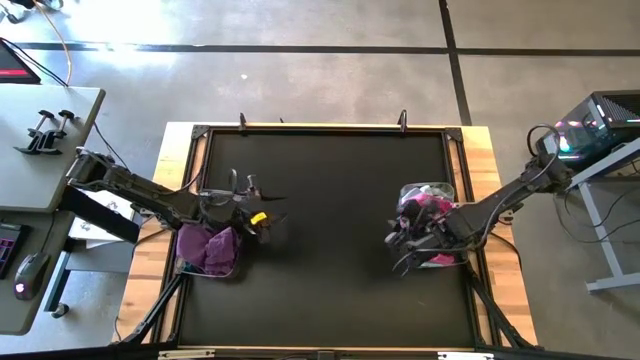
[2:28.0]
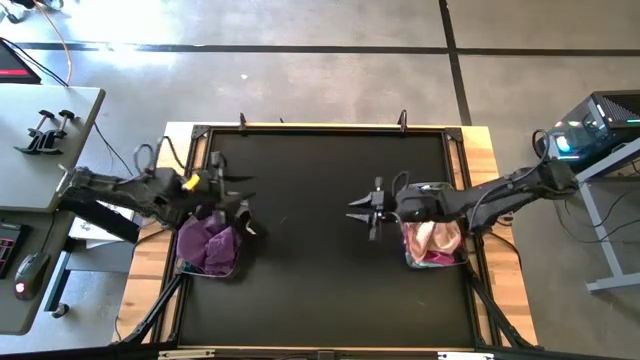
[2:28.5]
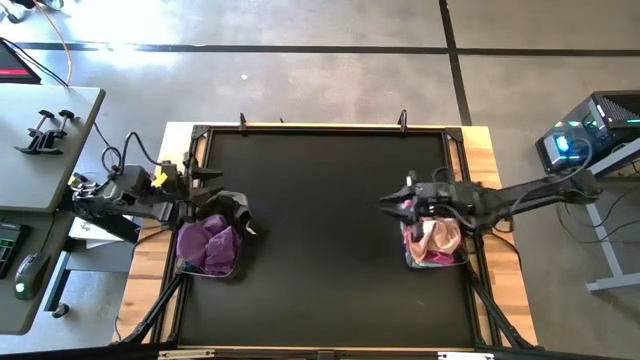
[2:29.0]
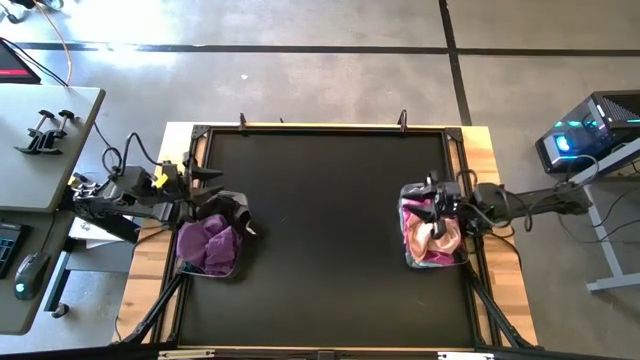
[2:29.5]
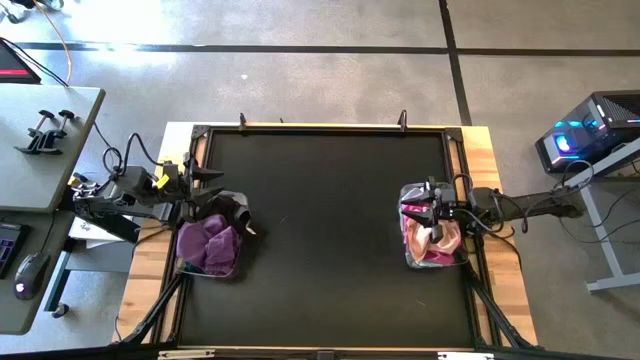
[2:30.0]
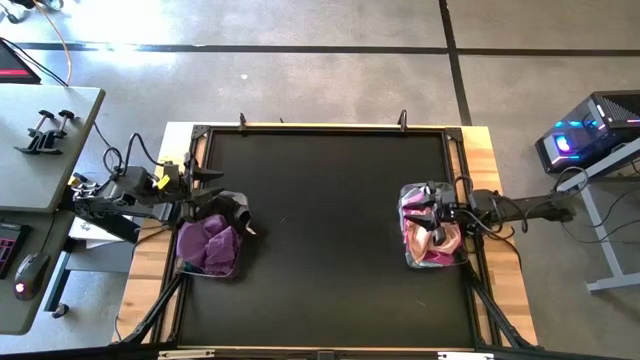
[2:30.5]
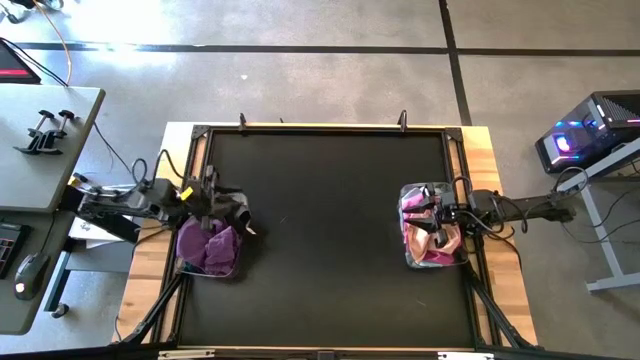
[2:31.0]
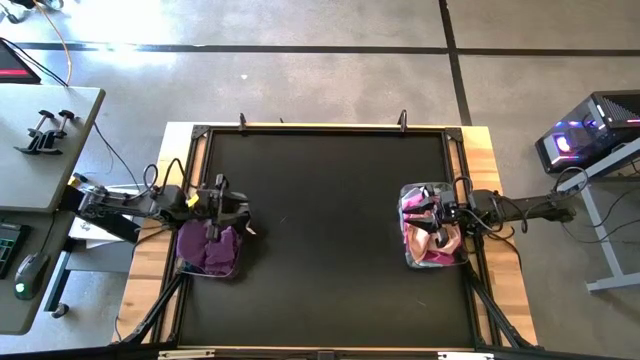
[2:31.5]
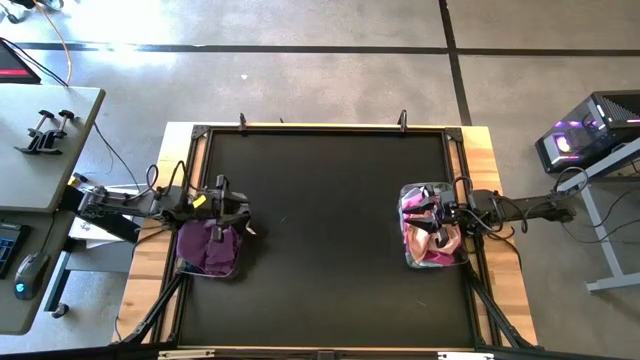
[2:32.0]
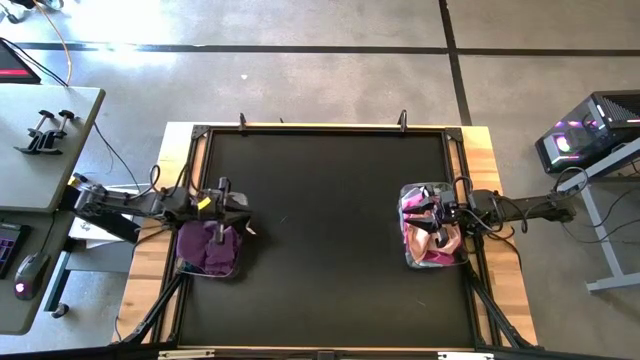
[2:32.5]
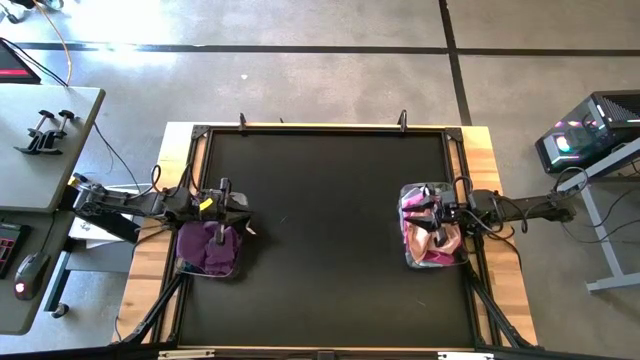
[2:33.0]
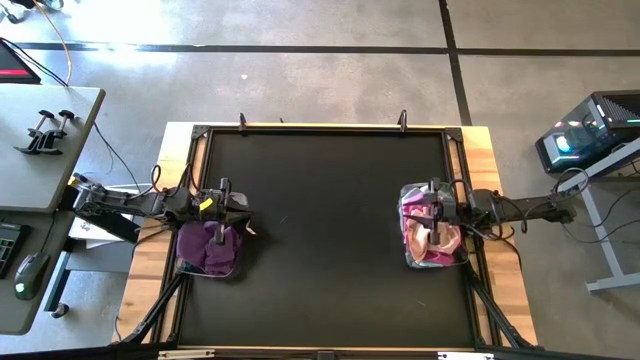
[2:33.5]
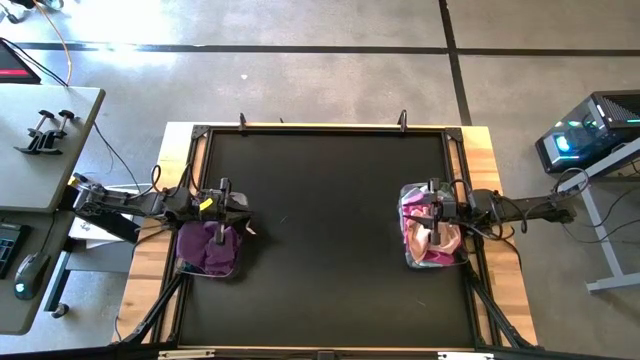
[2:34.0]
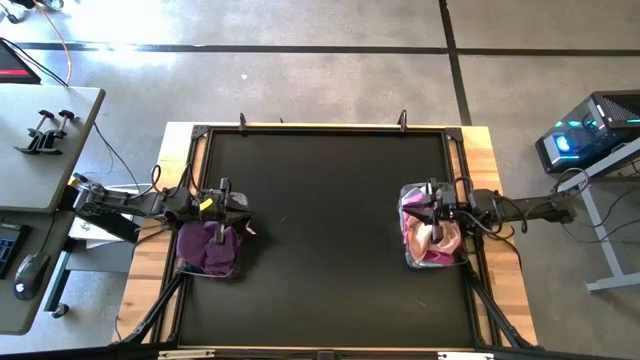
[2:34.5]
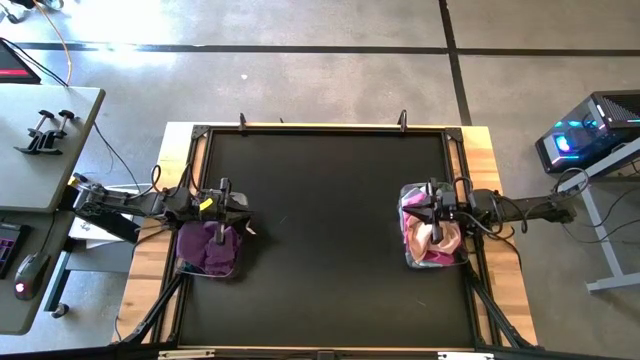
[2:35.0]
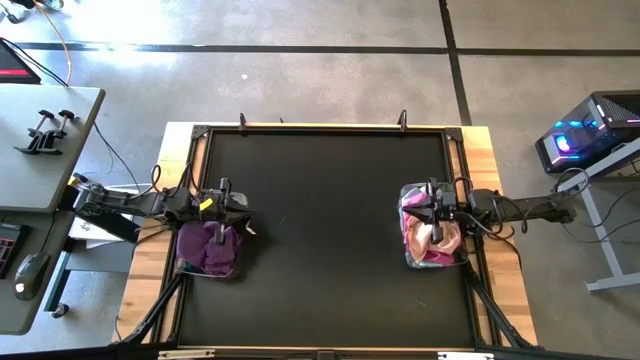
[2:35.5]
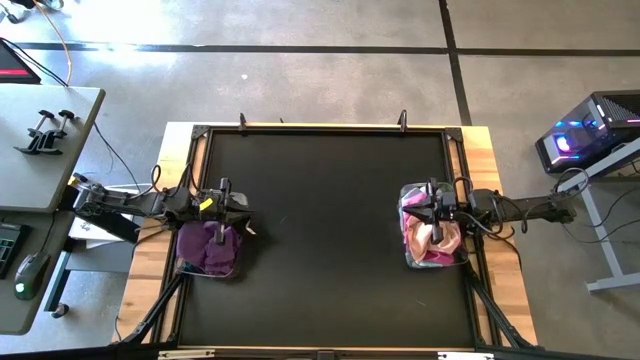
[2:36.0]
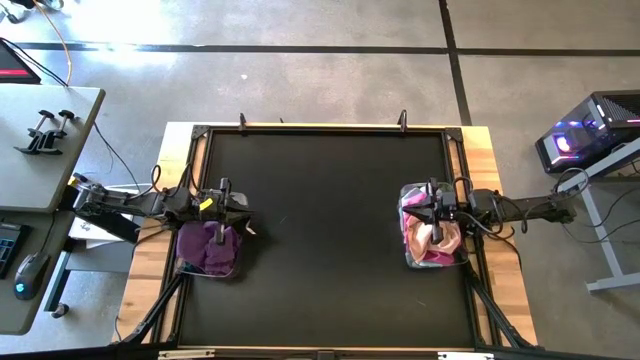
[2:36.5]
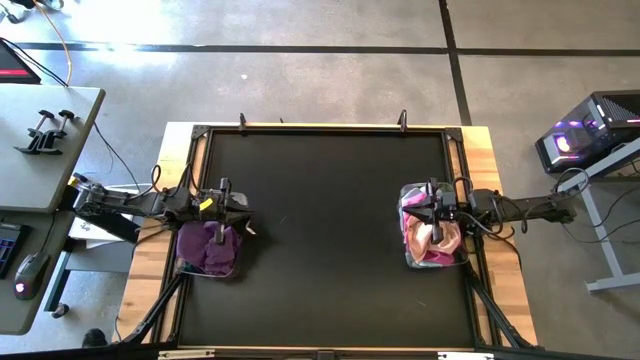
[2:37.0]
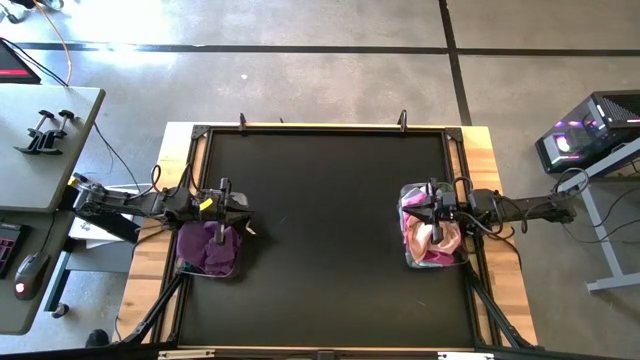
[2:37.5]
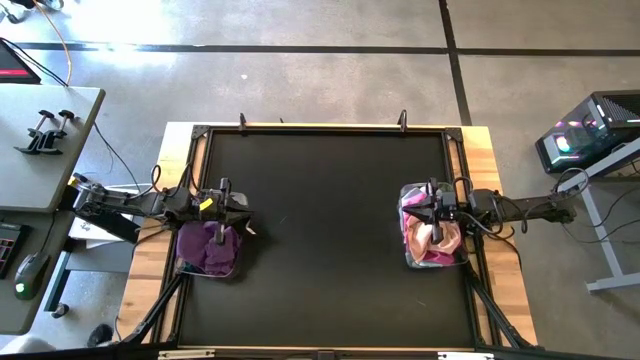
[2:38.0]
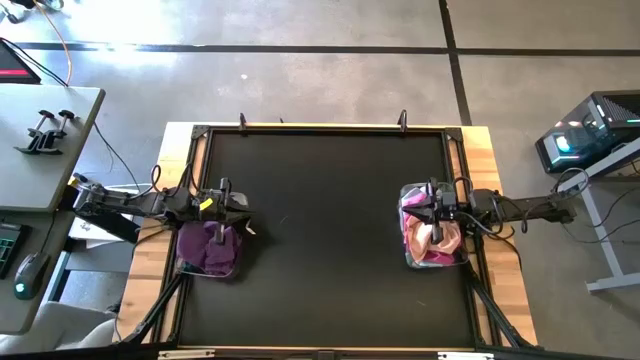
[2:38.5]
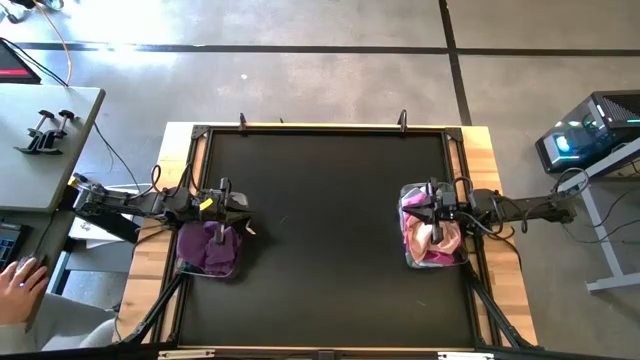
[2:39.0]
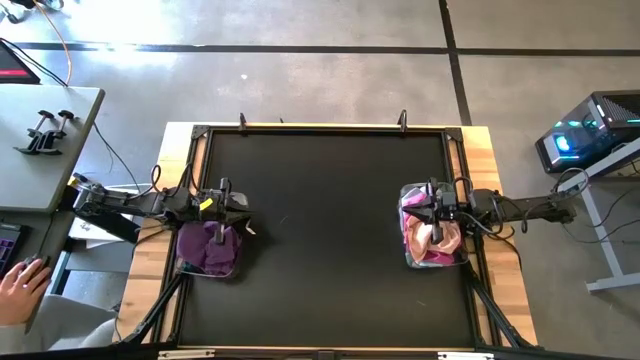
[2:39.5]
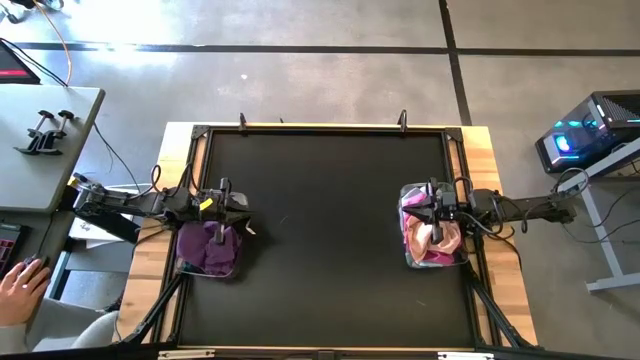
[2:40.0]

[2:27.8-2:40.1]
Task: Sort towels by color in basket
Return to Home Position

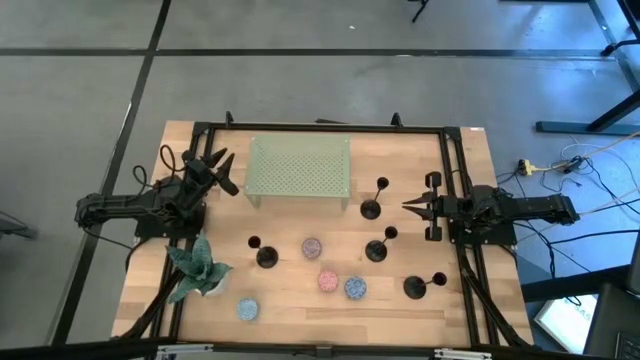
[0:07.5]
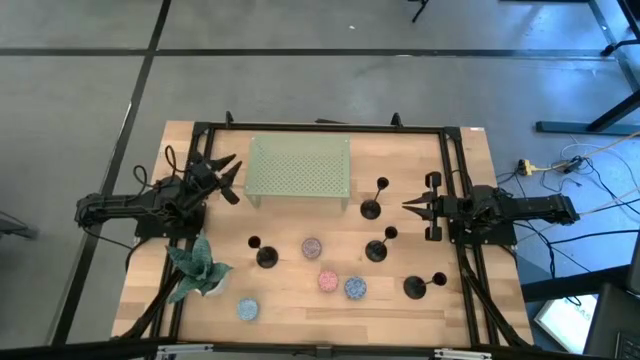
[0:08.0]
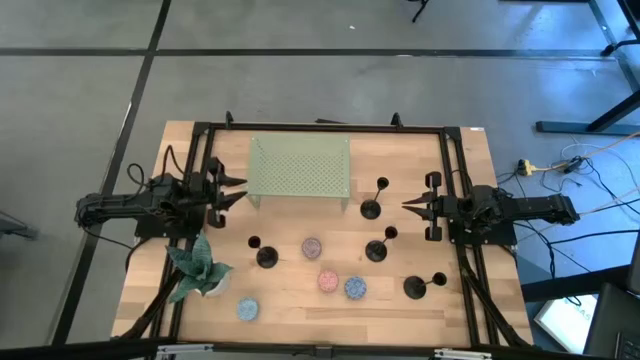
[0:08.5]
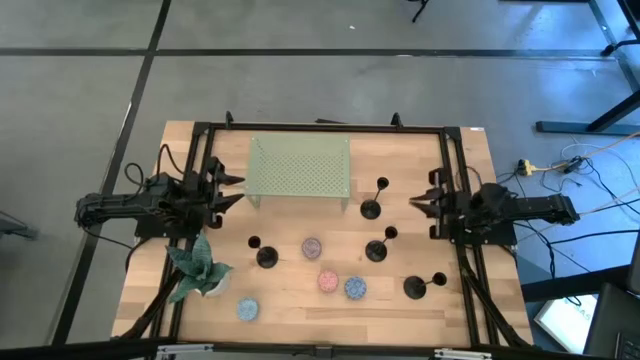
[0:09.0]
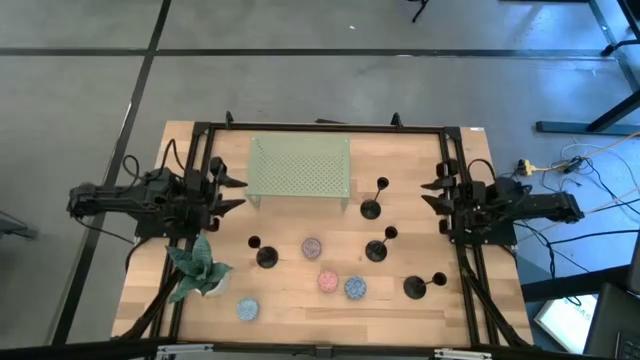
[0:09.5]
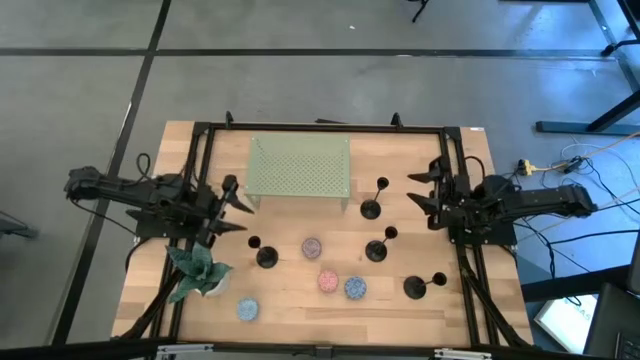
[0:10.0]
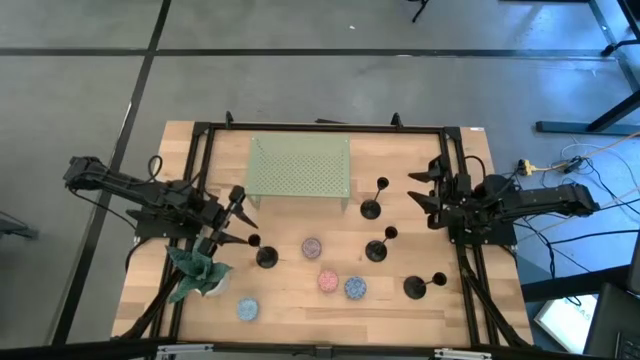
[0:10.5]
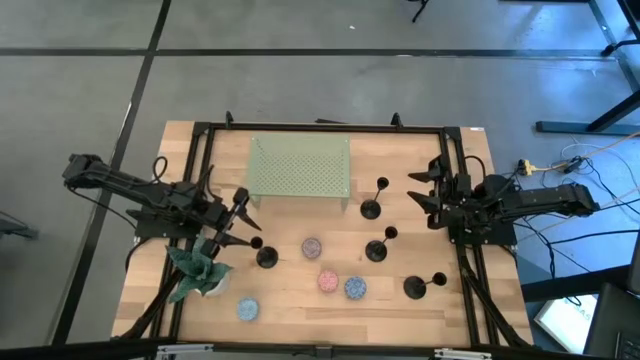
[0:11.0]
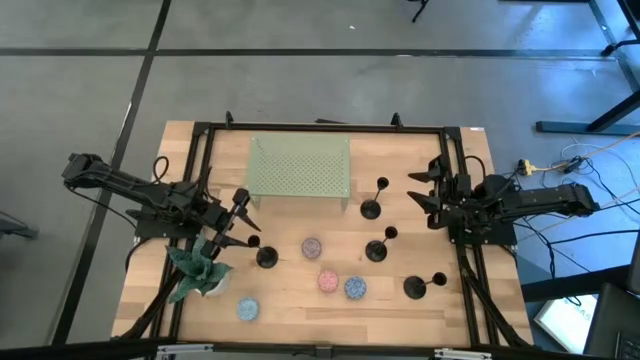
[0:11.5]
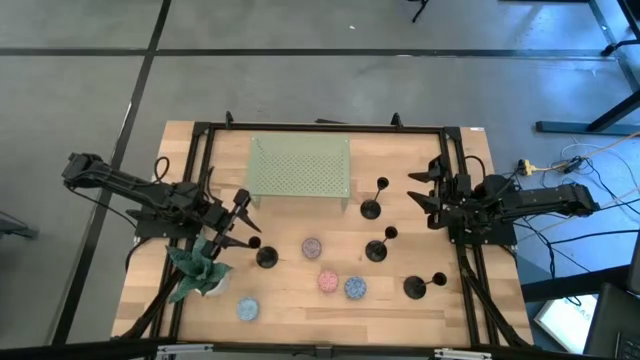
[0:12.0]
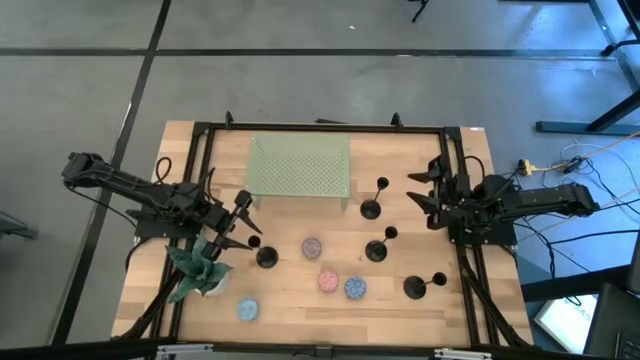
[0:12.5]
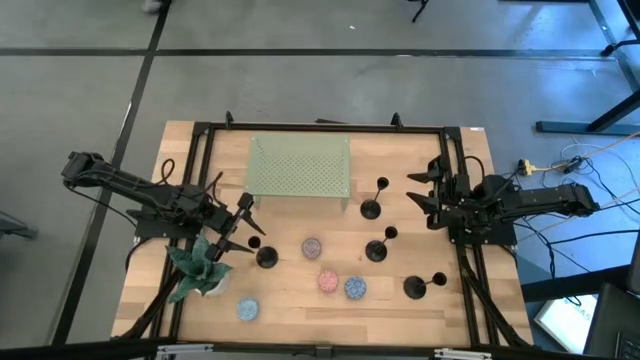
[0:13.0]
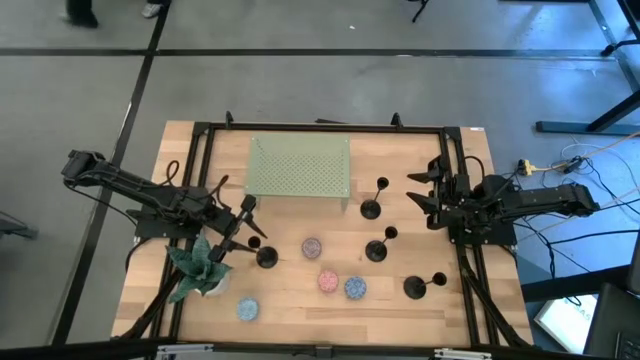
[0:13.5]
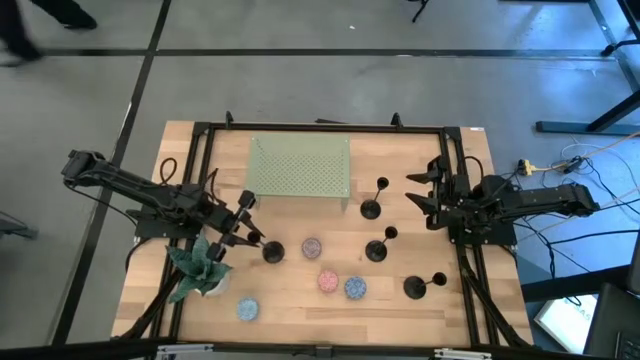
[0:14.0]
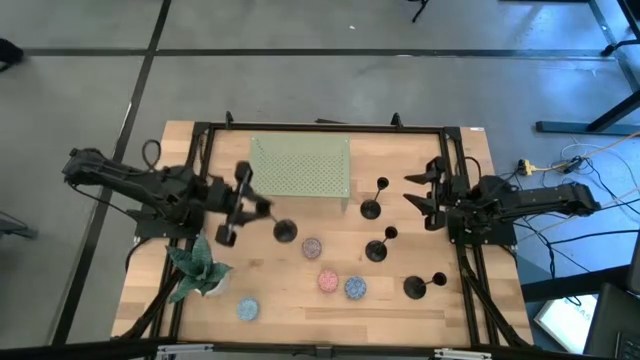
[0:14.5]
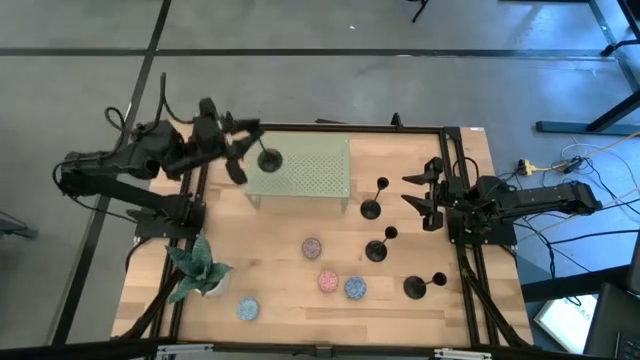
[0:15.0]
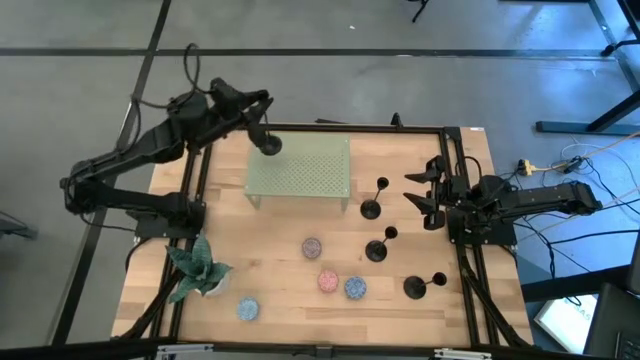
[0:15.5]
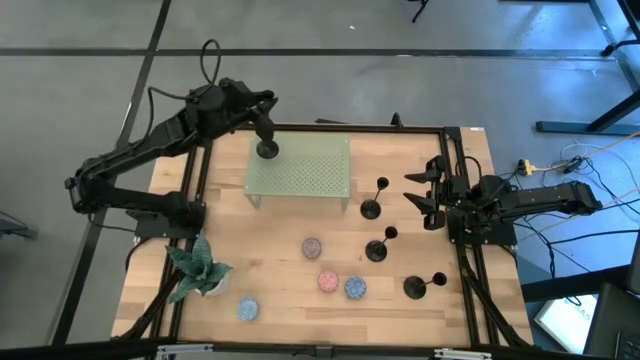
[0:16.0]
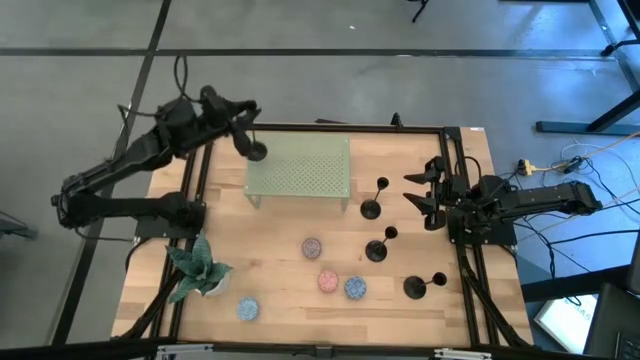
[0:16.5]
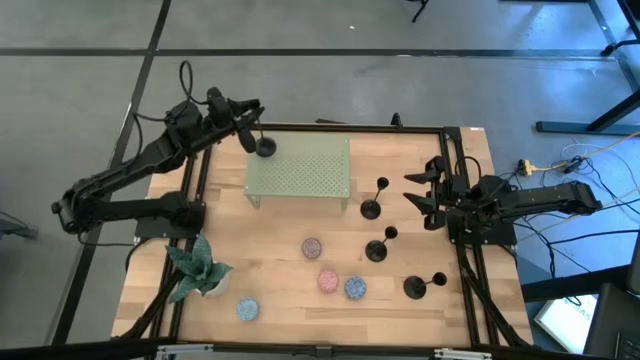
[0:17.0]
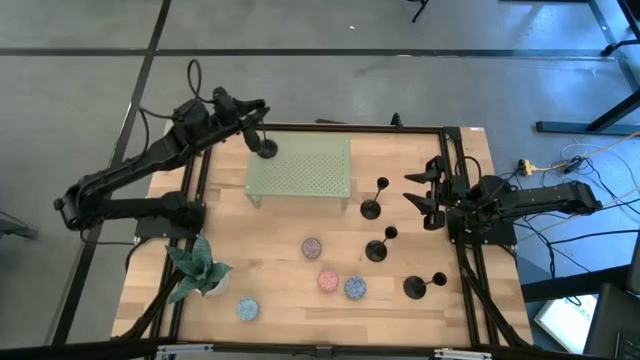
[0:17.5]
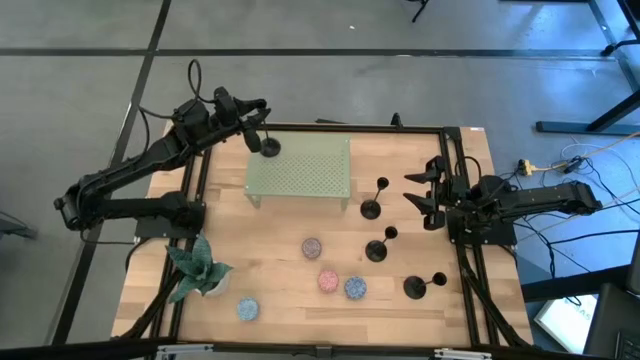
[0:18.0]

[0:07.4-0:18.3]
Task: Pick & Place candle stick holders
Put the black candle holder on the shelf
